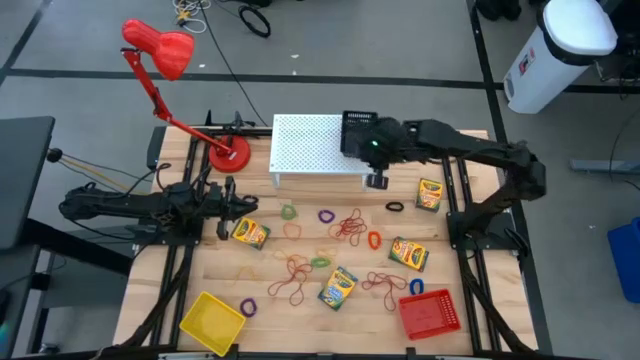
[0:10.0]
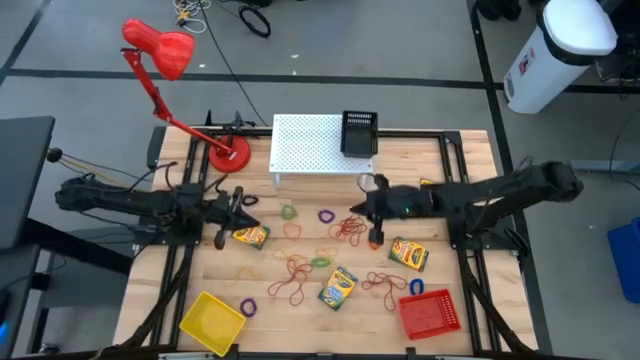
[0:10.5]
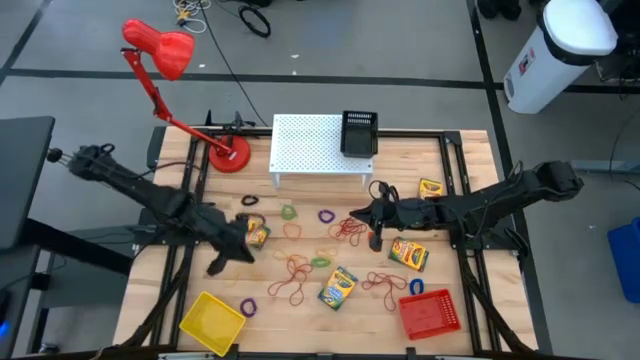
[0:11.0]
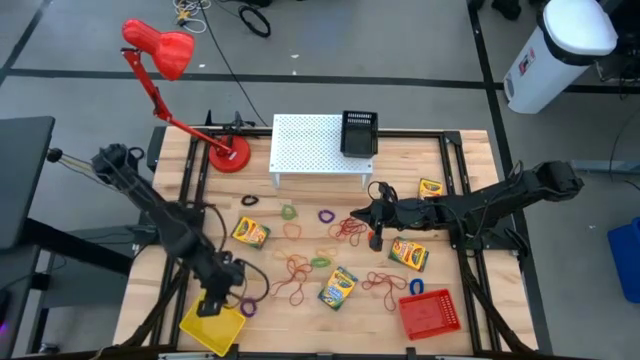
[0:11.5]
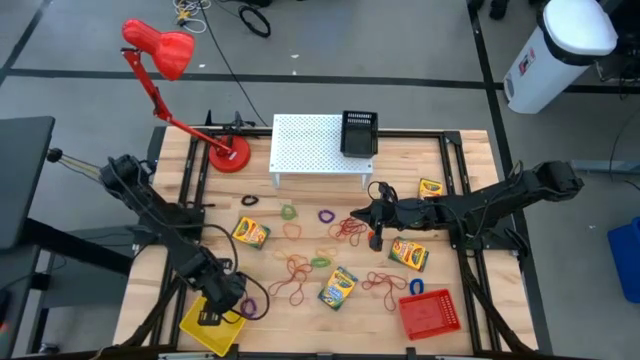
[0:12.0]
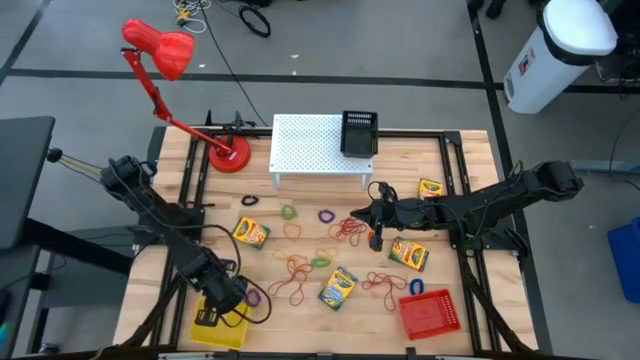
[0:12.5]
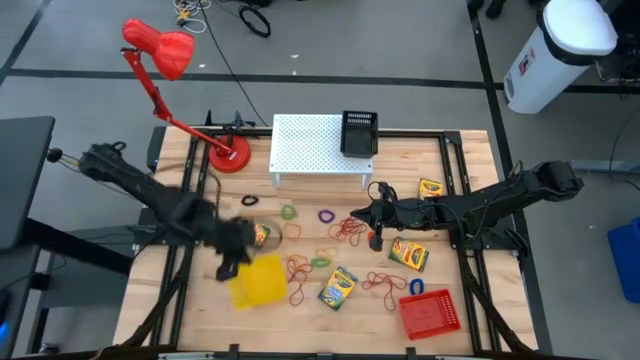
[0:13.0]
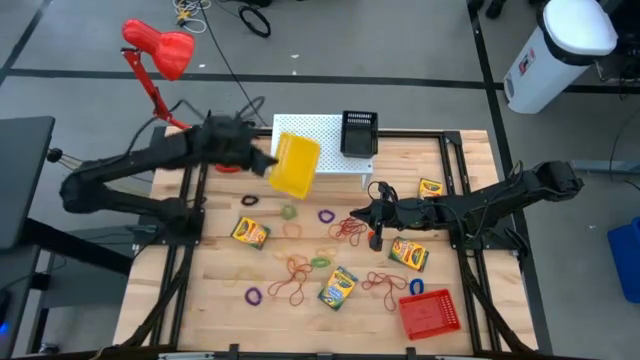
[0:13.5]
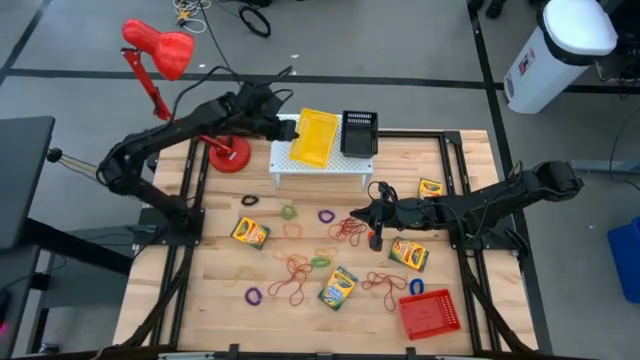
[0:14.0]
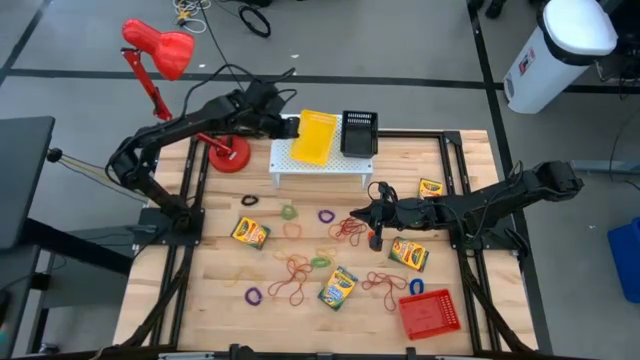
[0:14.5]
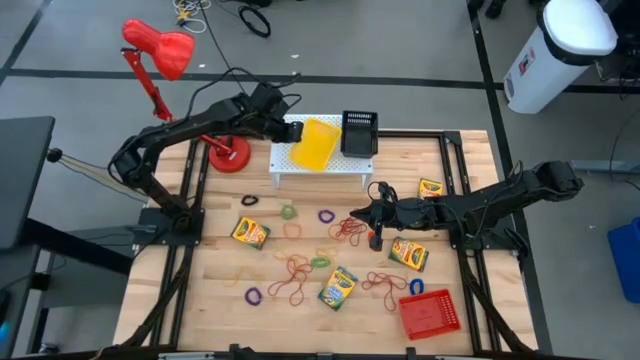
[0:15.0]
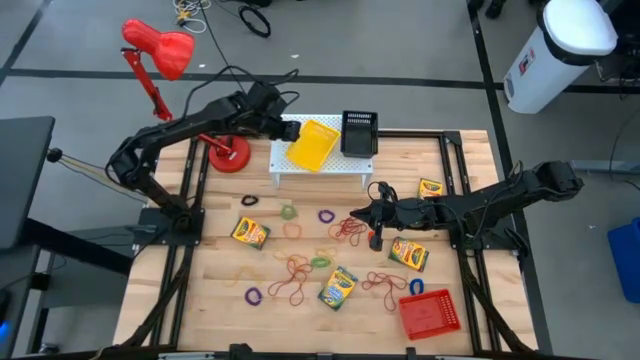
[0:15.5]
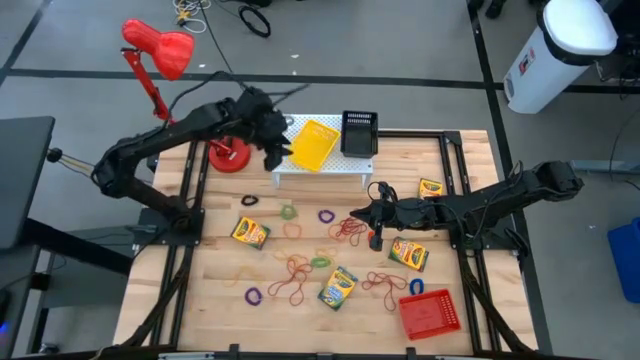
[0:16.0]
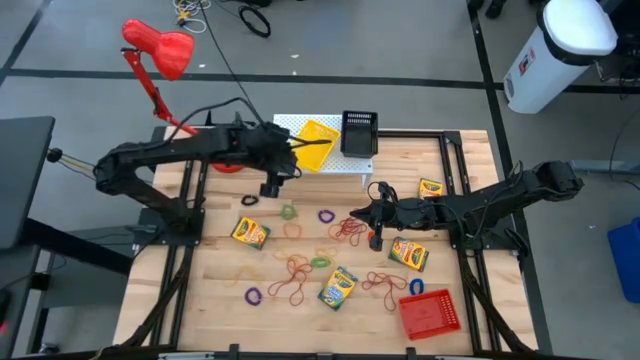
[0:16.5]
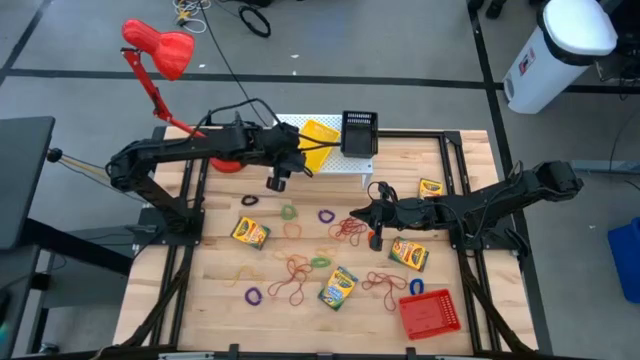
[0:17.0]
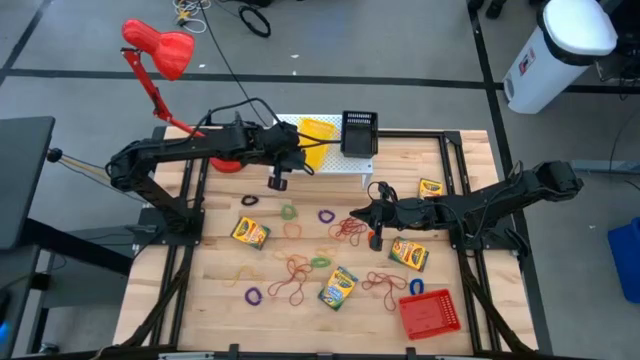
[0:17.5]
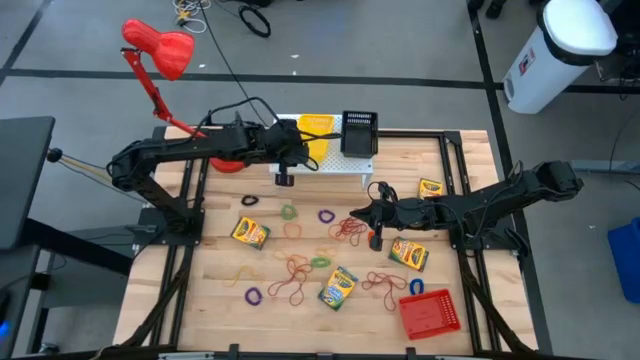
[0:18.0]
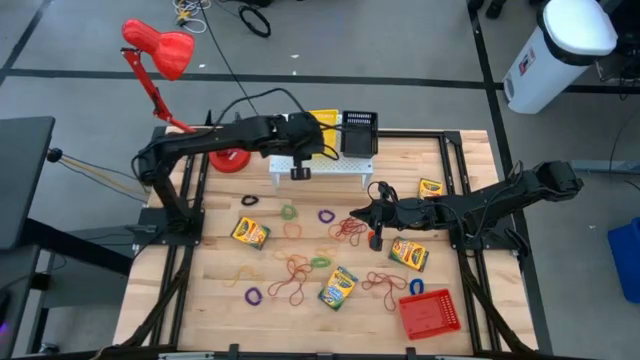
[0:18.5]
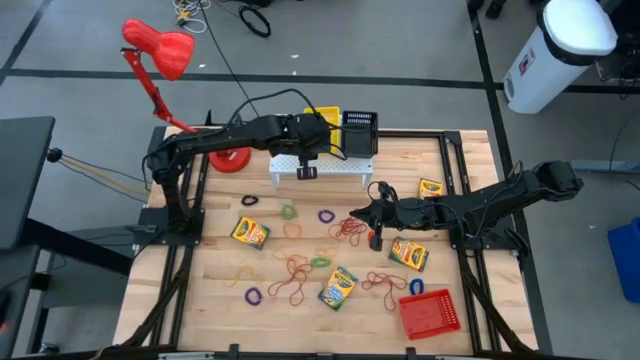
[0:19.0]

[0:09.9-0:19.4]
Task: Pick & Place Office Desk Supplies
Put the yellow bin on the shelf

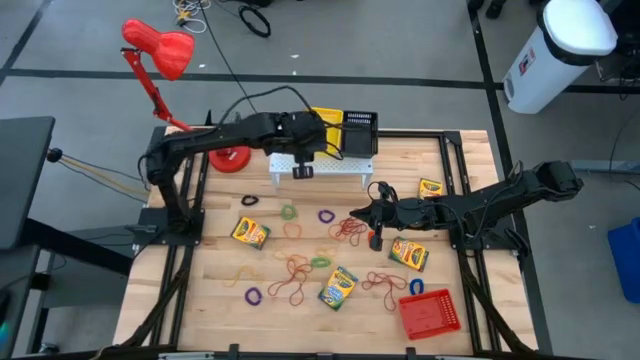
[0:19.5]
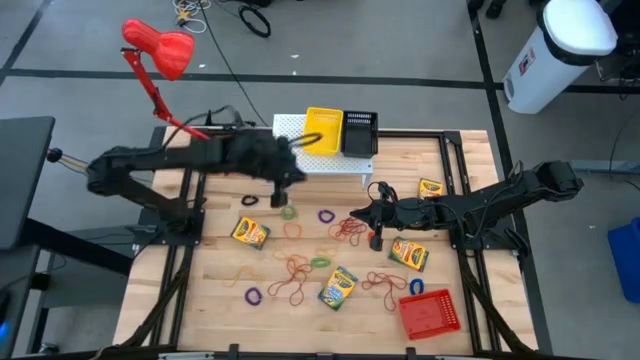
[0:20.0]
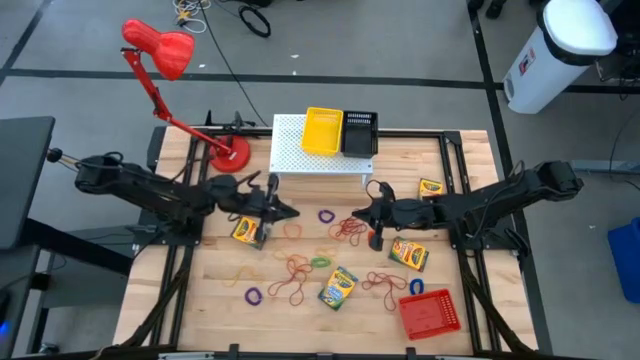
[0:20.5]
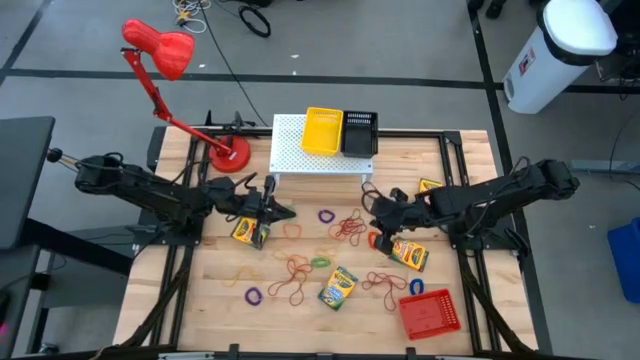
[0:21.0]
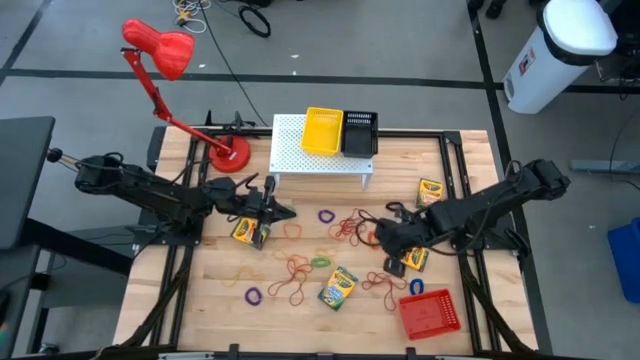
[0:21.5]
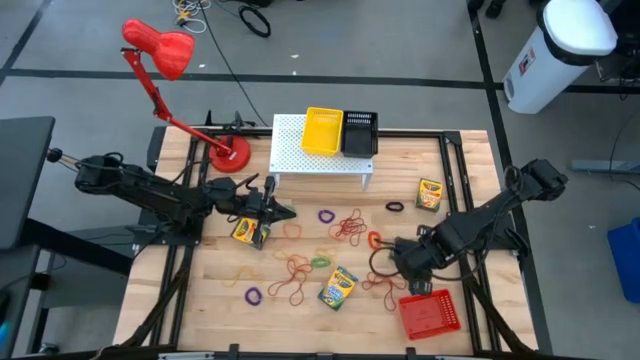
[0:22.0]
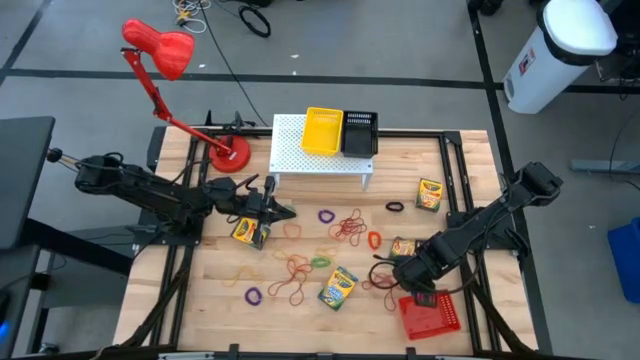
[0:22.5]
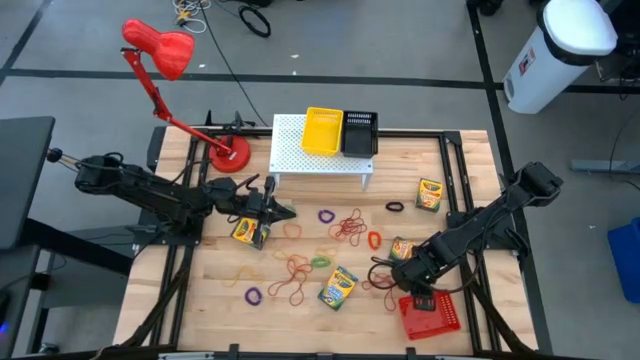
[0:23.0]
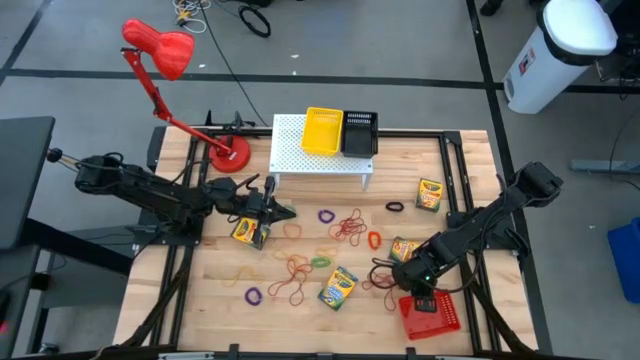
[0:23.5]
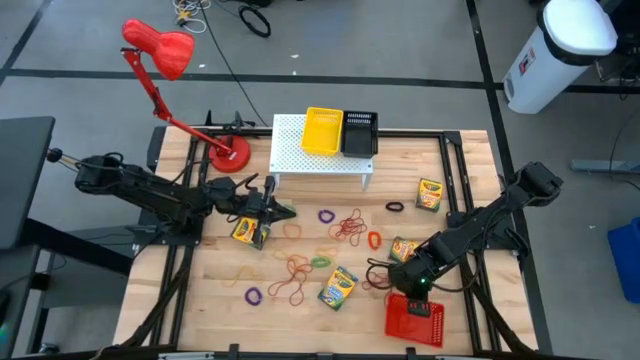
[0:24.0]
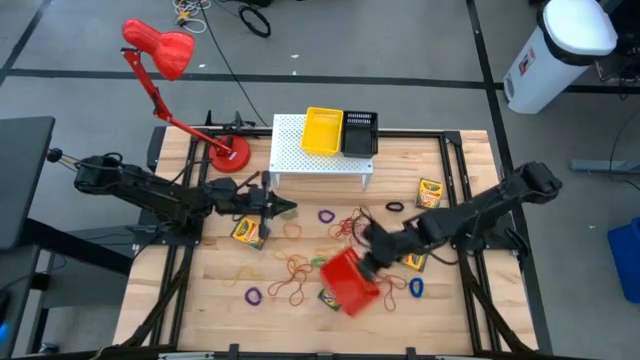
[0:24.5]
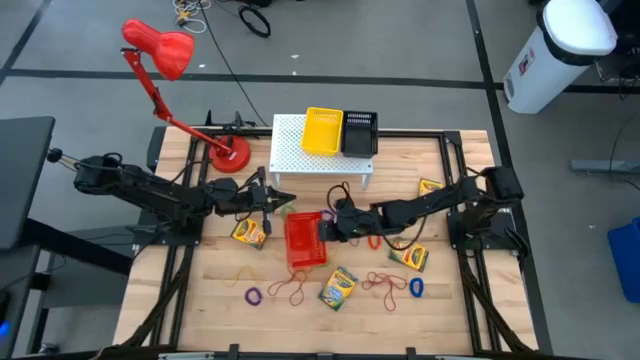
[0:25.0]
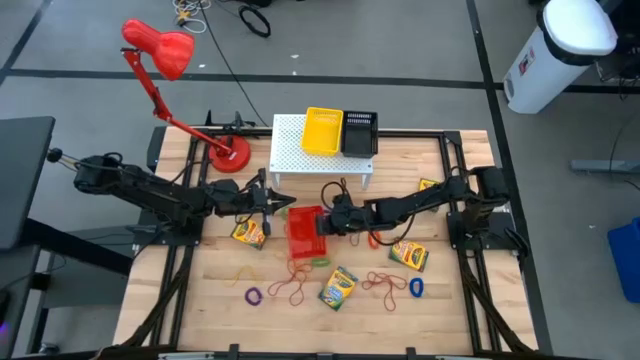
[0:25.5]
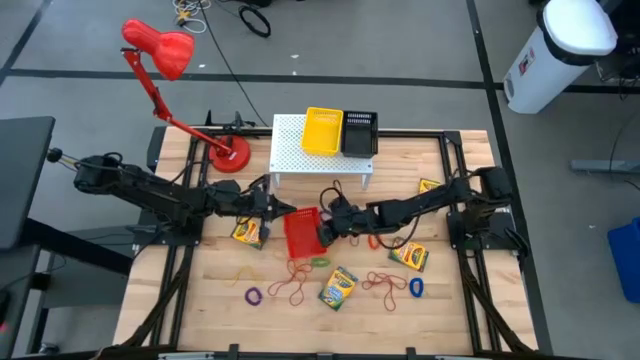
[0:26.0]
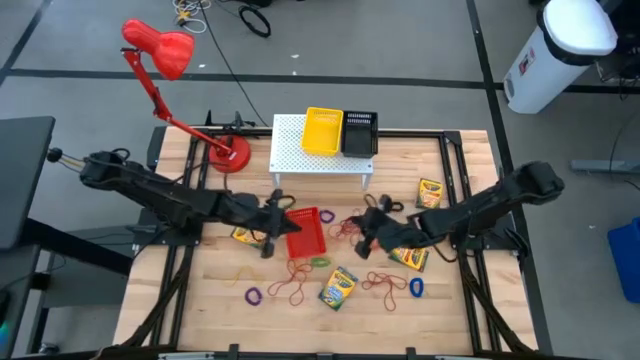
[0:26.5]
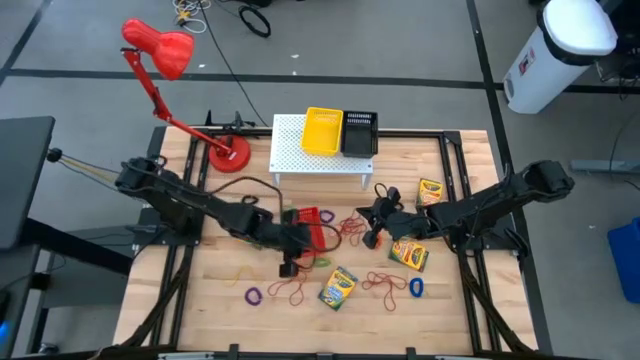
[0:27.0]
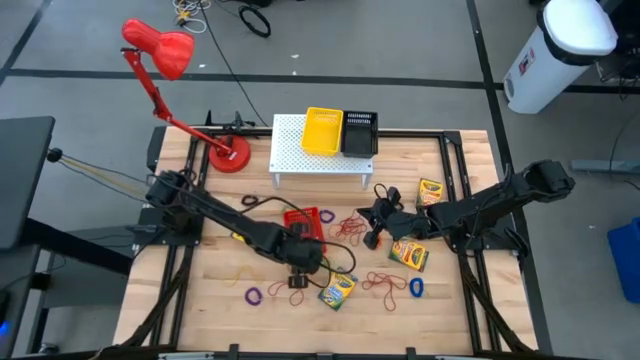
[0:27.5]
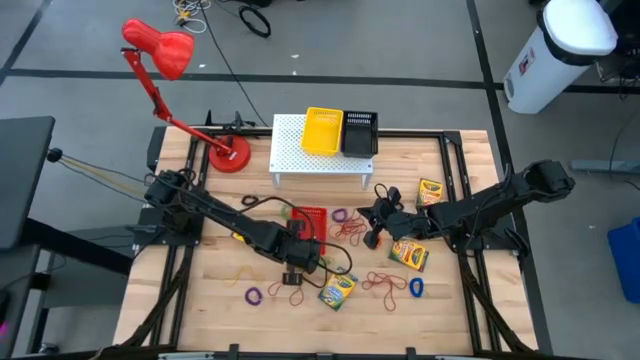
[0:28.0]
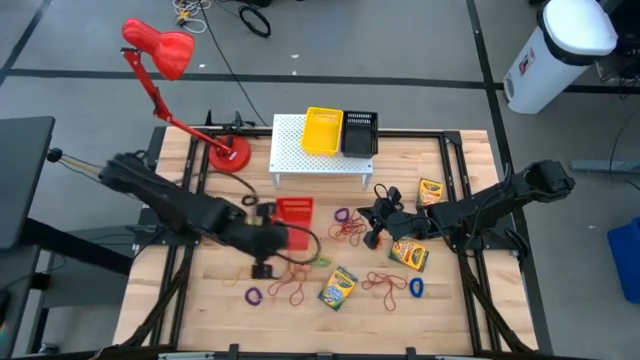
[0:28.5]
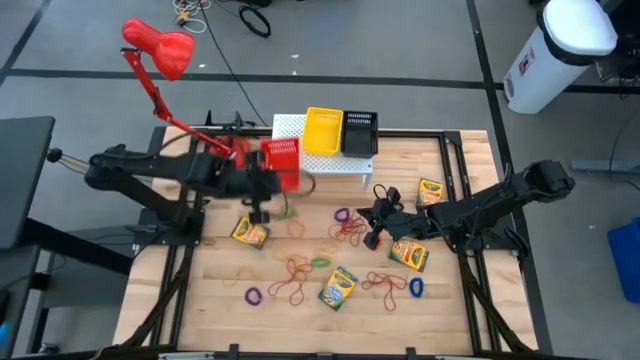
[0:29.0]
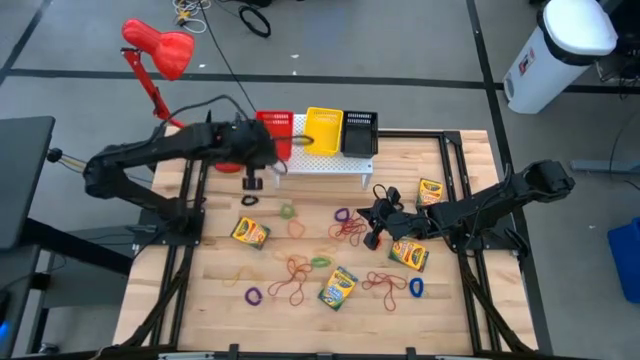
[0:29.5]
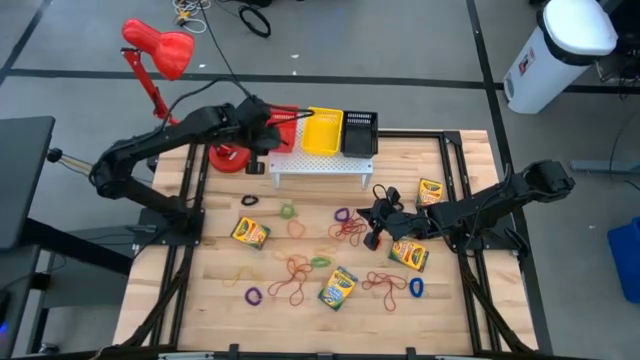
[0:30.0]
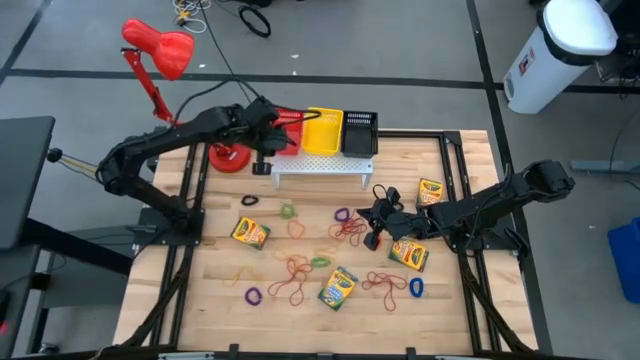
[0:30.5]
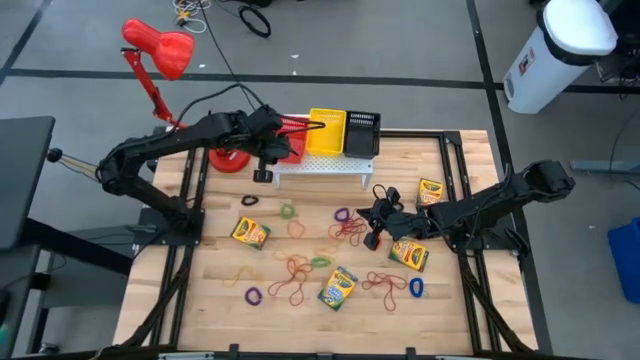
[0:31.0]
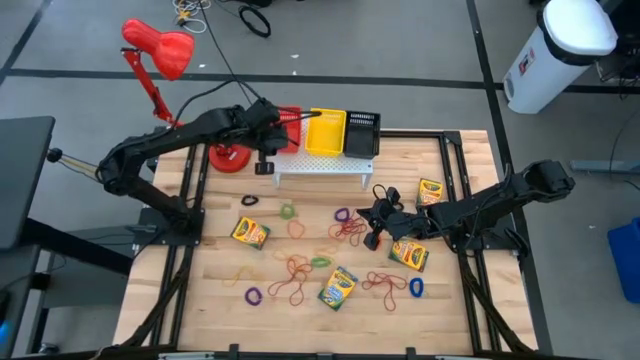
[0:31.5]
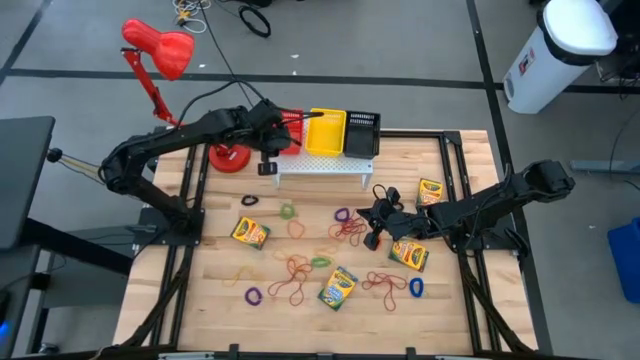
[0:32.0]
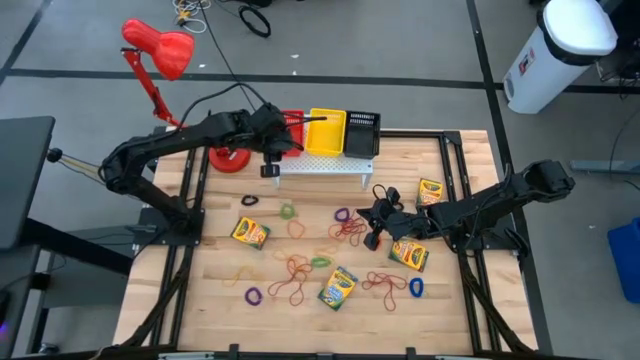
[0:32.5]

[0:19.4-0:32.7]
Put the red bin on the shelf
